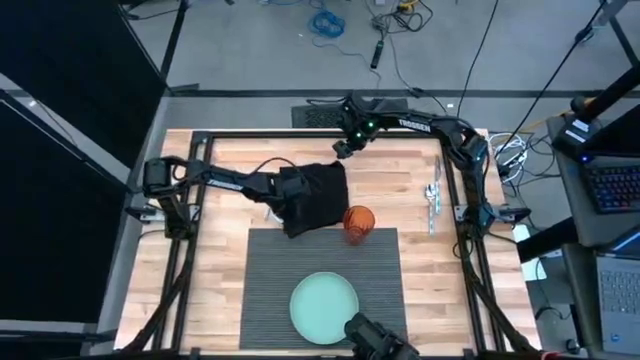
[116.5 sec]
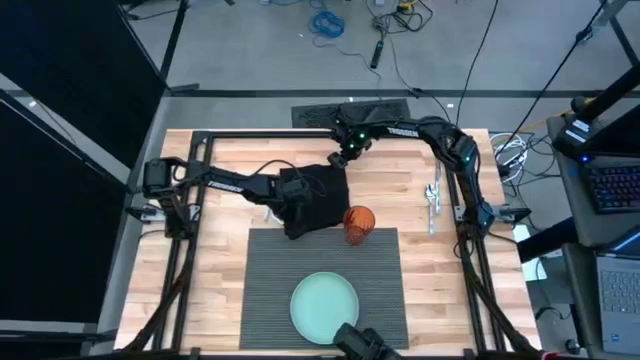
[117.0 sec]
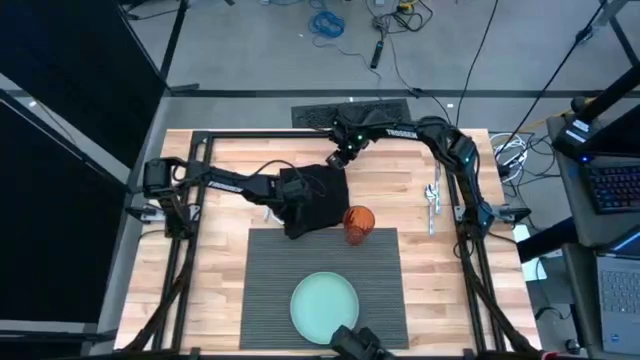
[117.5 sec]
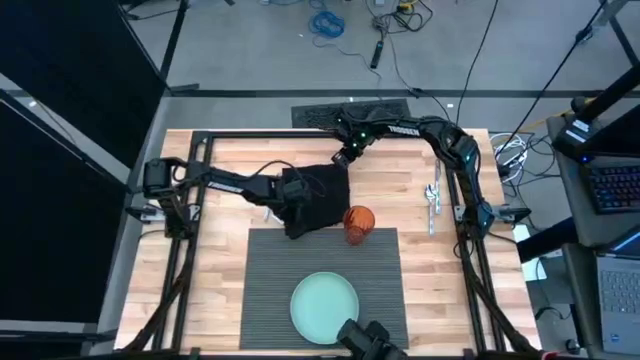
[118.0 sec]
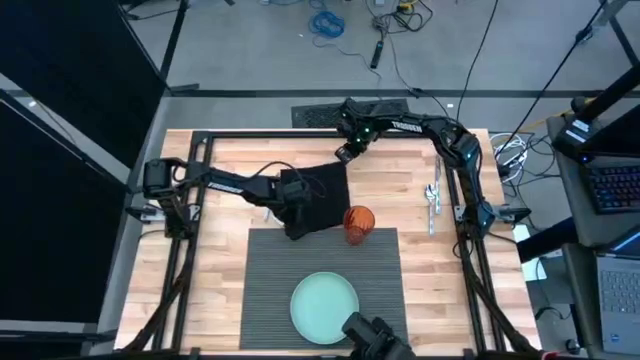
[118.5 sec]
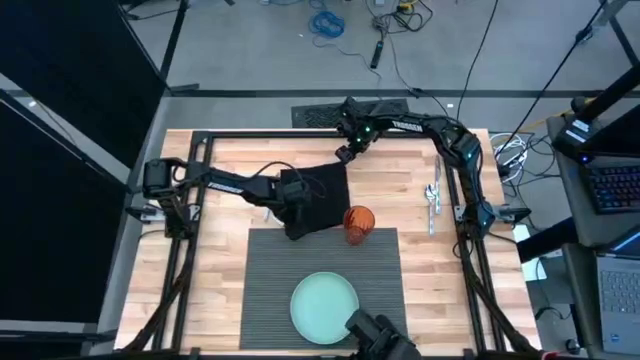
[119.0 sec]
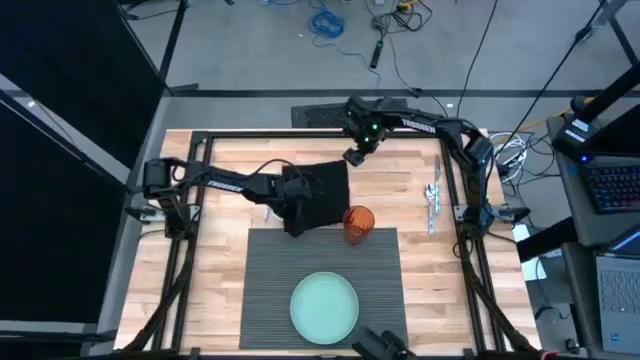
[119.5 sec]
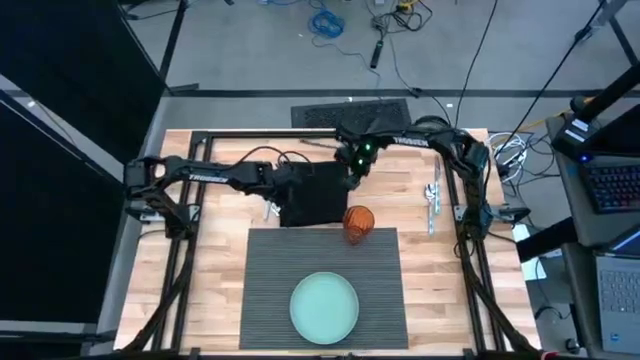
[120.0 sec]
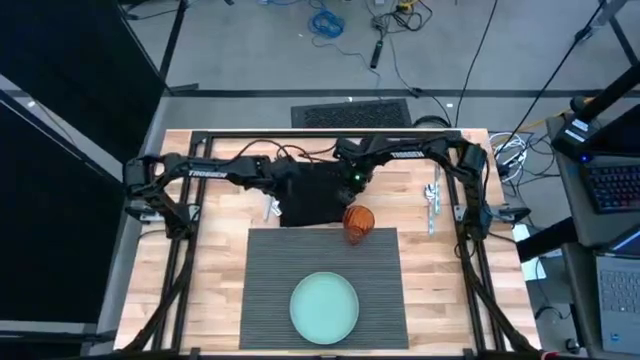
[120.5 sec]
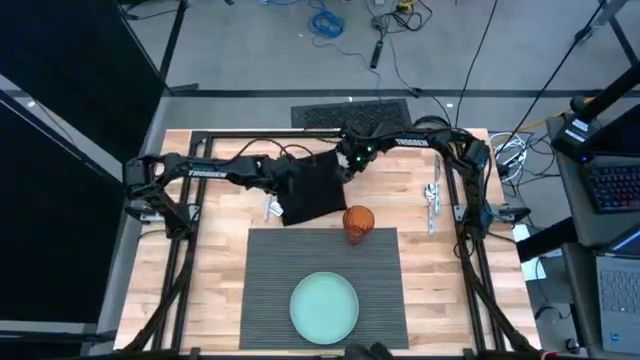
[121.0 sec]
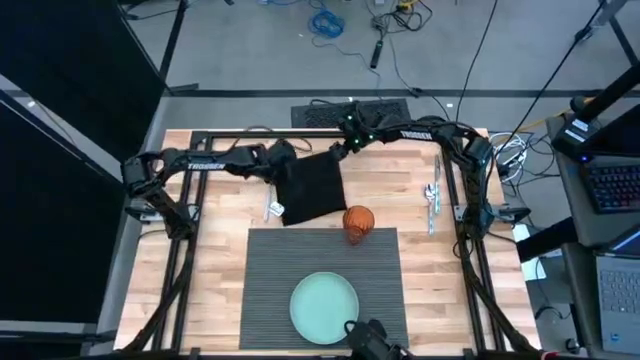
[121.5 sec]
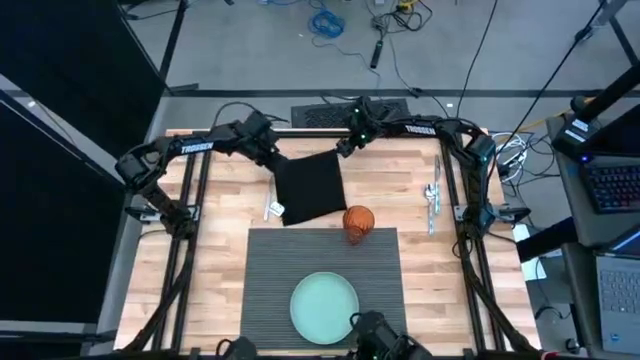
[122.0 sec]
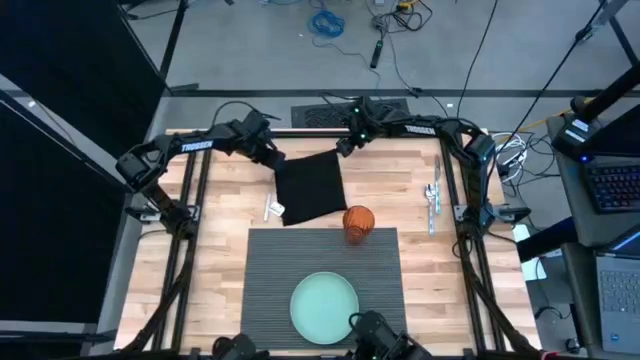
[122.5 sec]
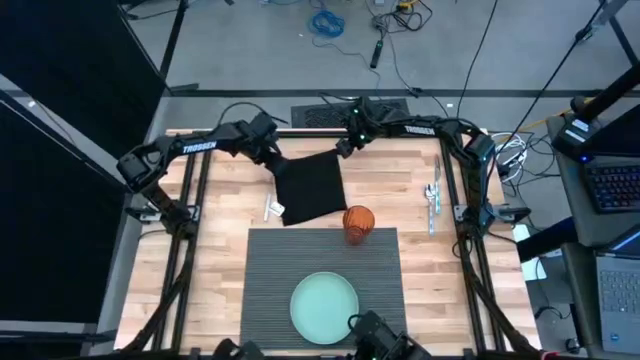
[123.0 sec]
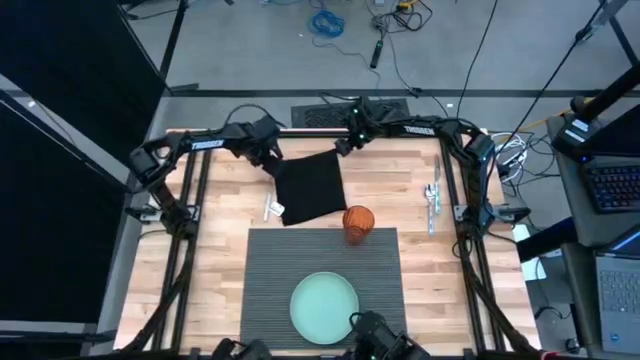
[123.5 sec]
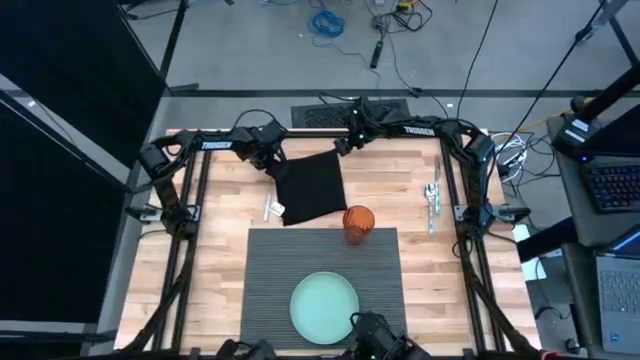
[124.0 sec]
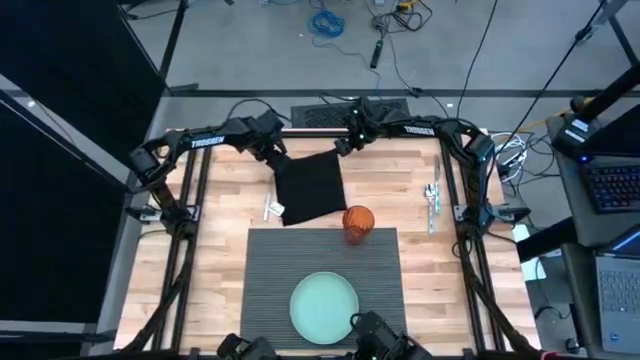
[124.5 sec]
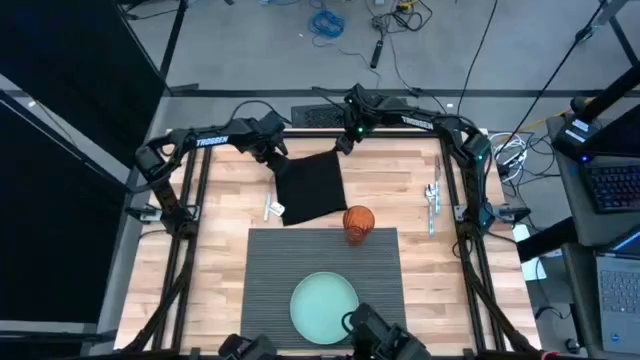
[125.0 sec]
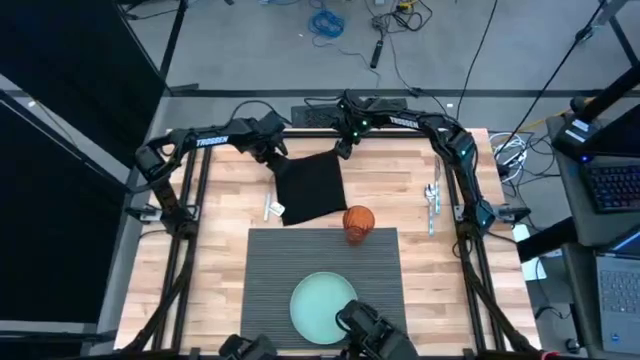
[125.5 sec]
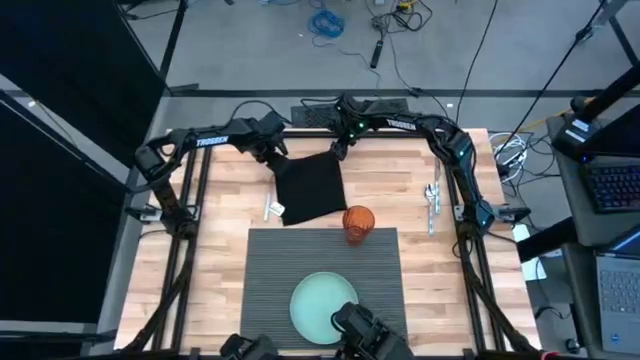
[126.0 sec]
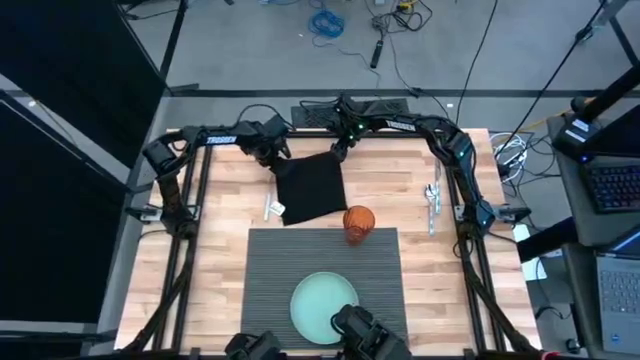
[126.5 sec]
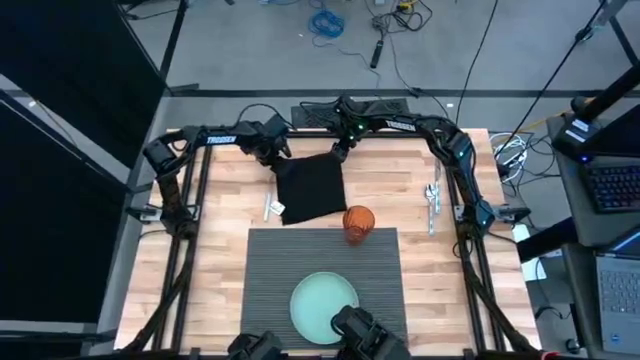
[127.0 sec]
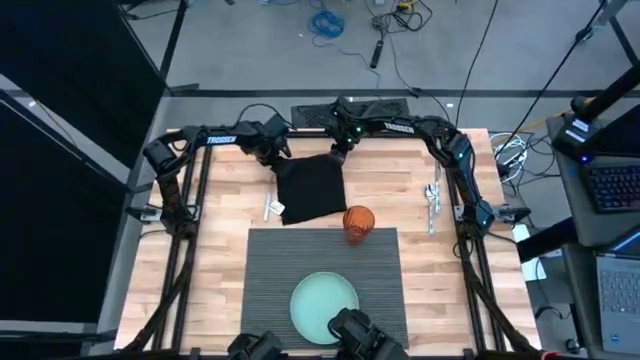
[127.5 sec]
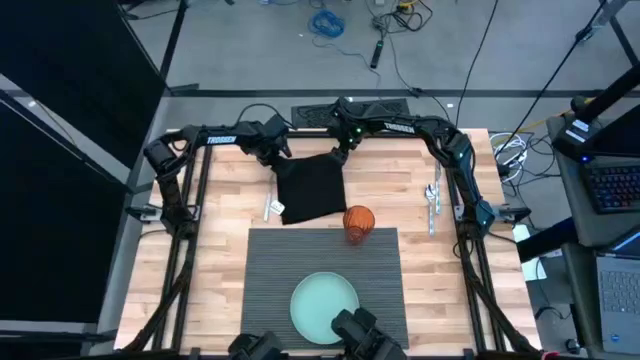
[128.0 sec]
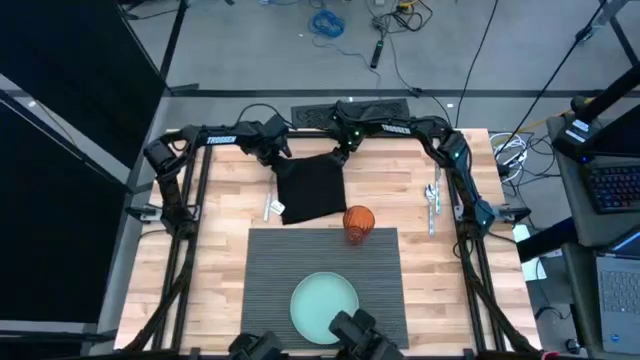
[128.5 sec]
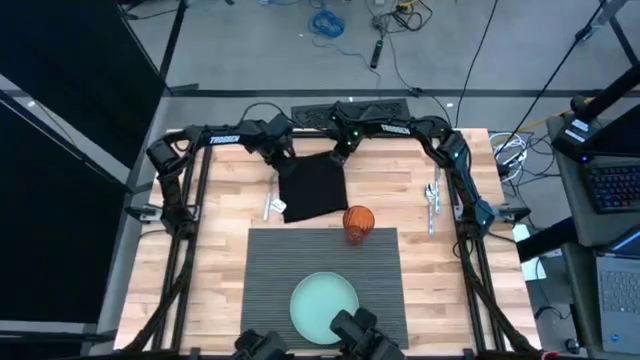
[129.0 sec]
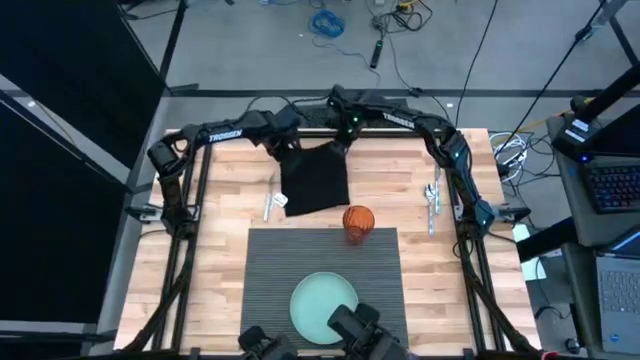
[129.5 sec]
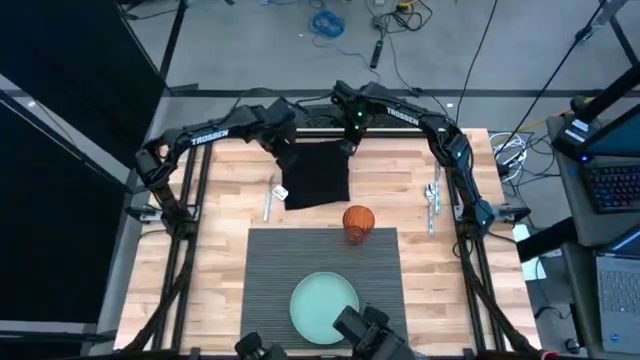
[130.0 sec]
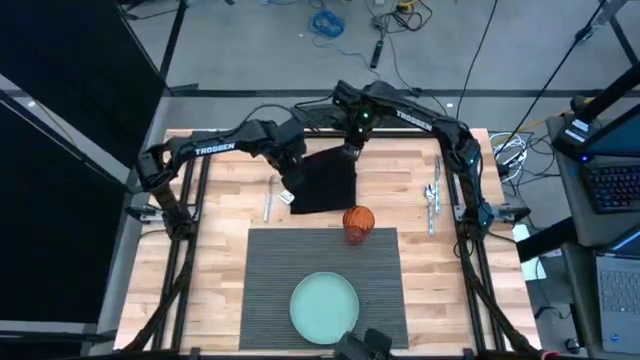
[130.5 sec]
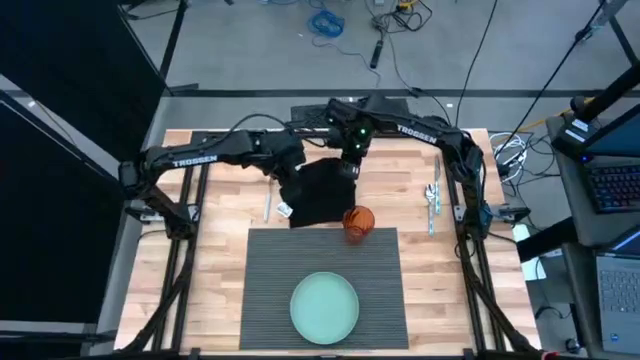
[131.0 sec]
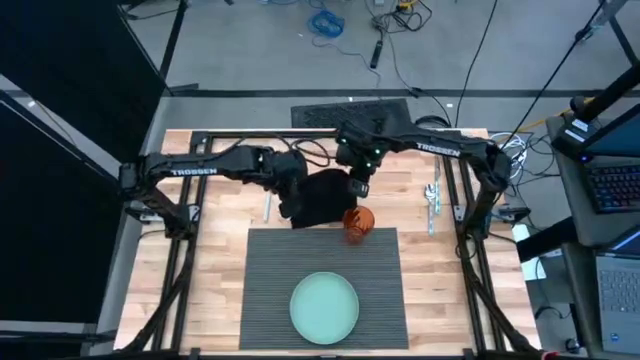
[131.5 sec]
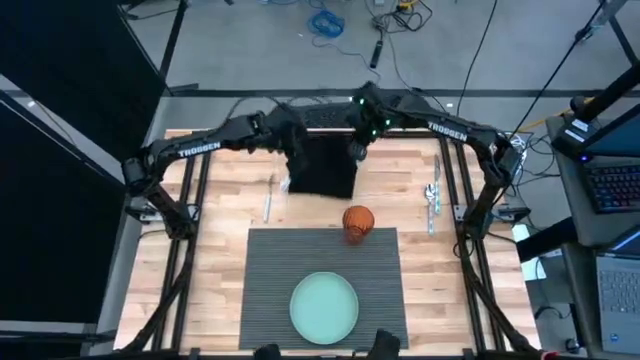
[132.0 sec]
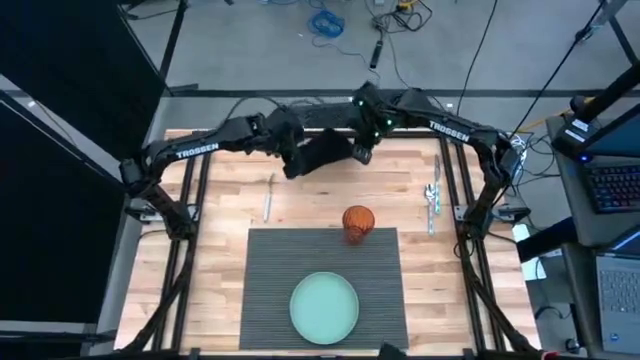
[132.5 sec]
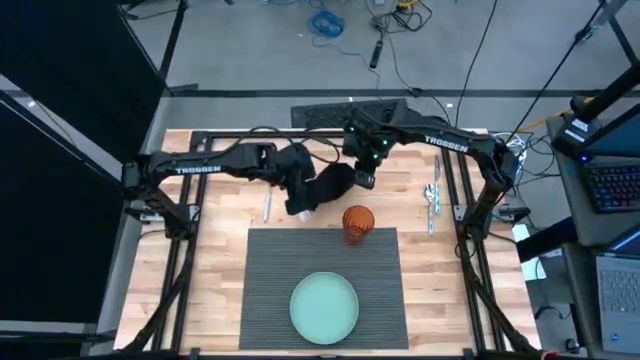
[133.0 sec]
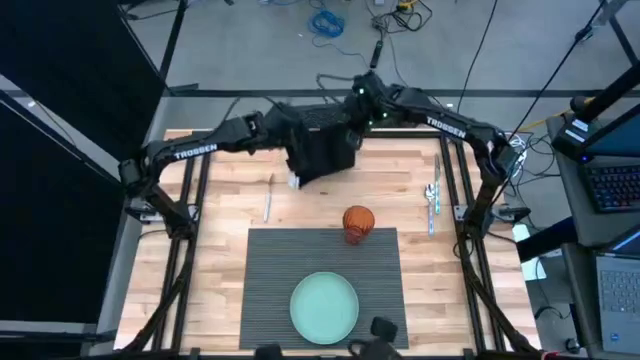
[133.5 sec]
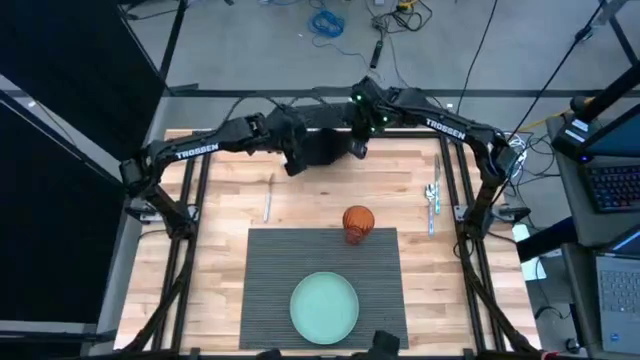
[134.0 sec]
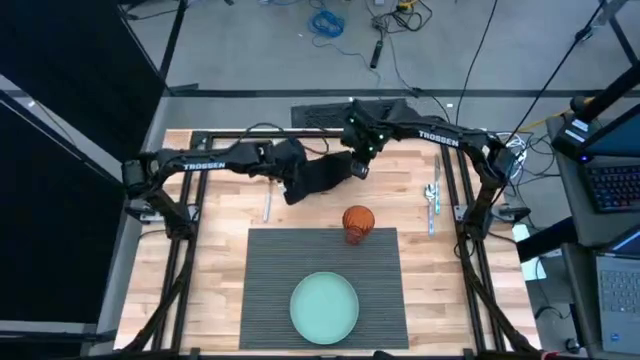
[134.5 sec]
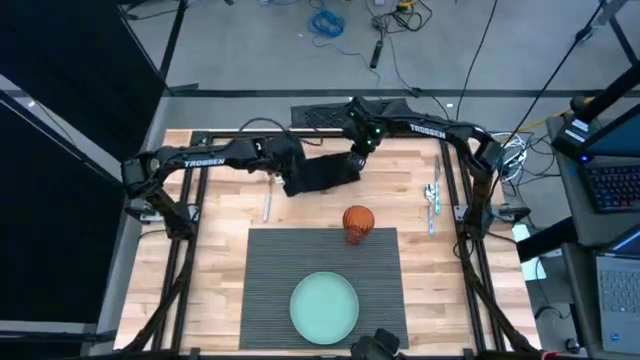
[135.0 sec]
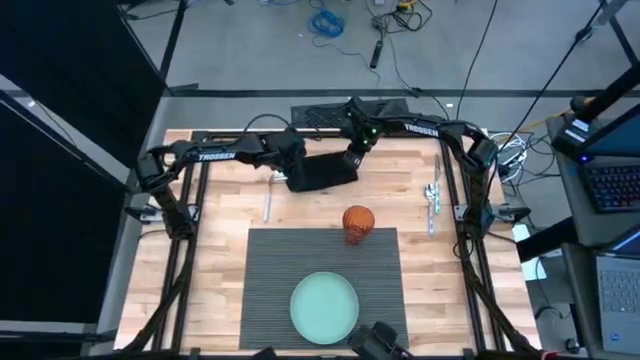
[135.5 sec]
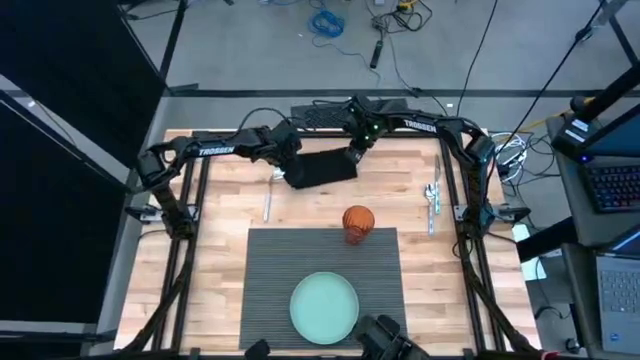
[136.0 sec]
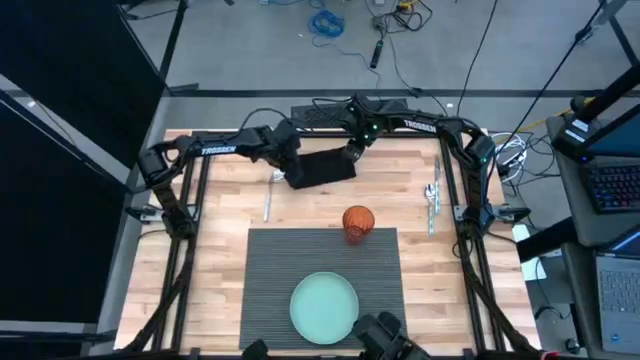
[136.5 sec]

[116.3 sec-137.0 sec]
Task: Set table place
Fold the black napkin

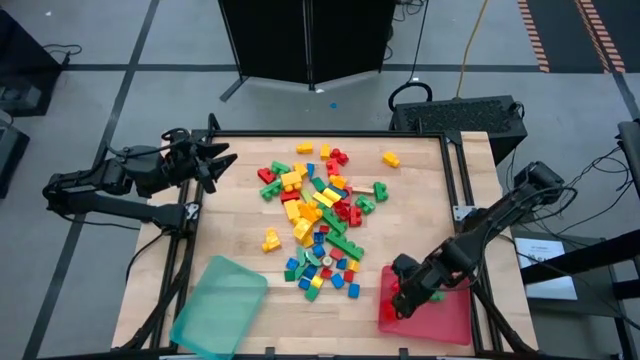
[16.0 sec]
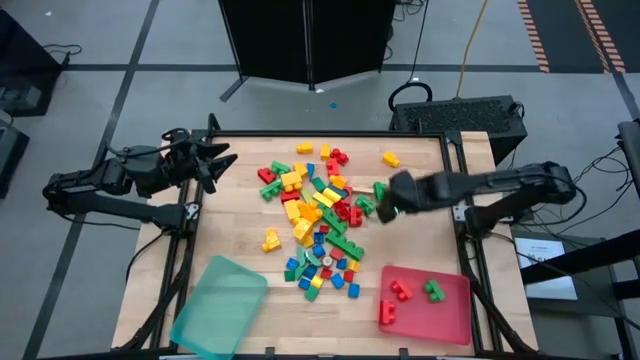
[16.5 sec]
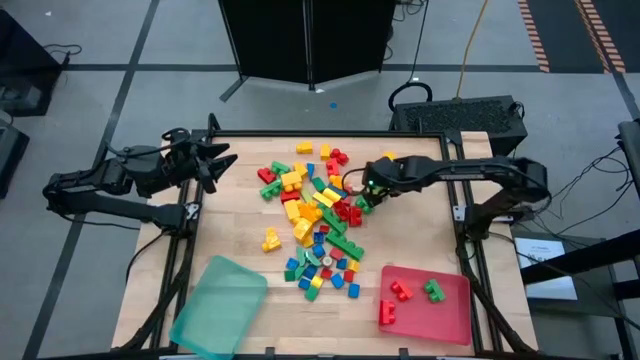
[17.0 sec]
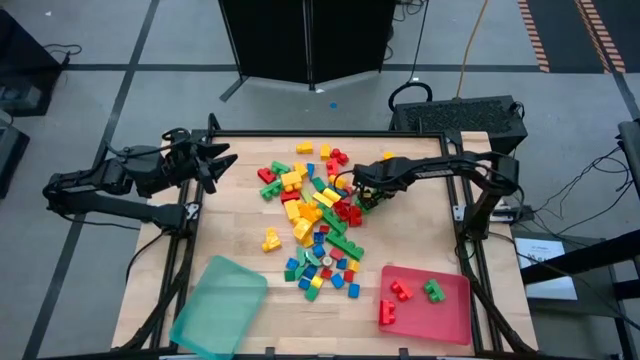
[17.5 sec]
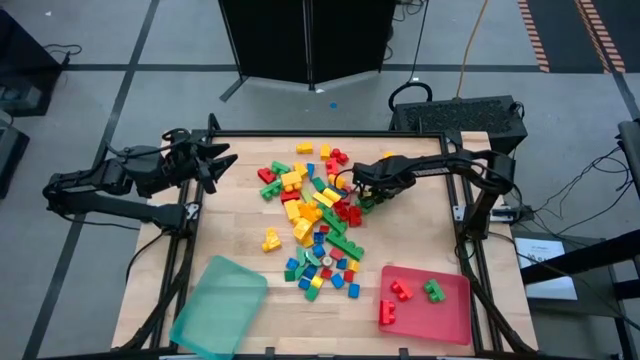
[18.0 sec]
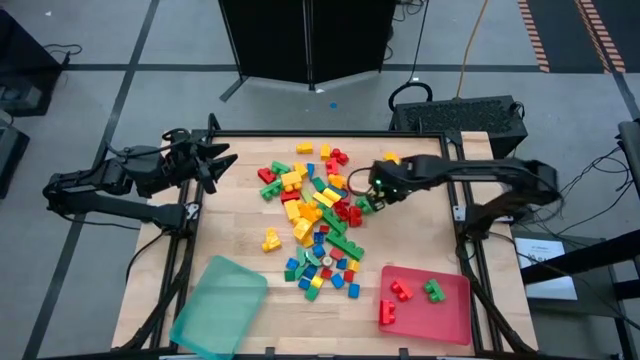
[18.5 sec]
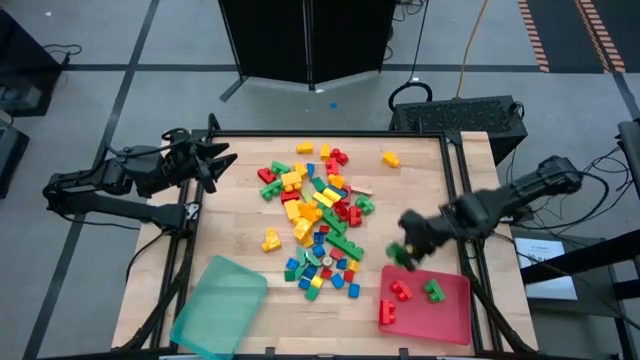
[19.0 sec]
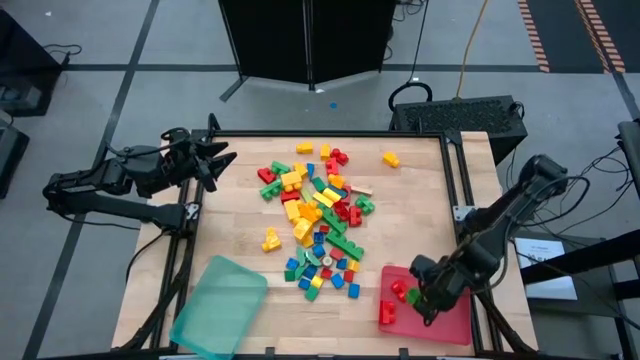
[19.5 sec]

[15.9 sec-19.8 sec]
Task: Sort blocks by size
Put the 2-stud green game piece into the pink bin
